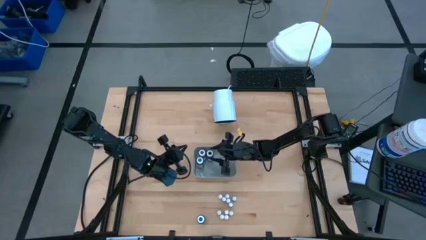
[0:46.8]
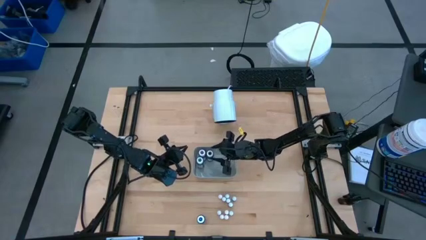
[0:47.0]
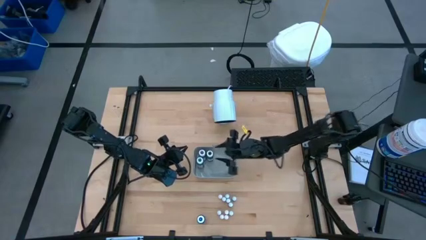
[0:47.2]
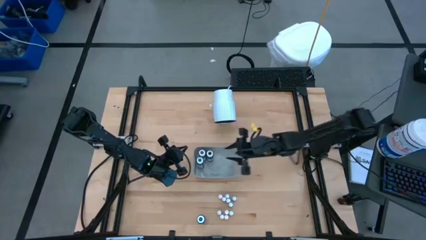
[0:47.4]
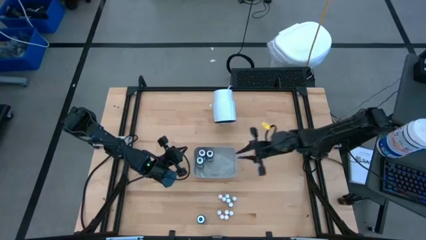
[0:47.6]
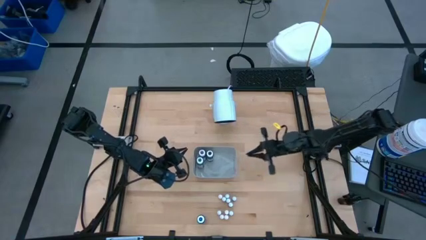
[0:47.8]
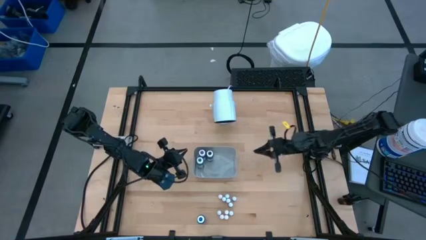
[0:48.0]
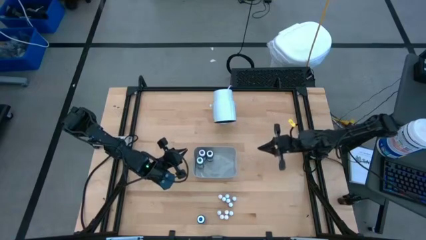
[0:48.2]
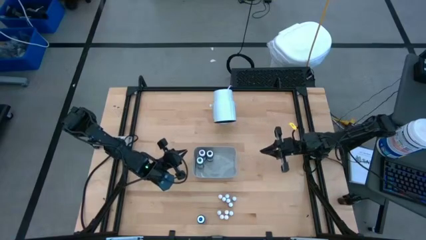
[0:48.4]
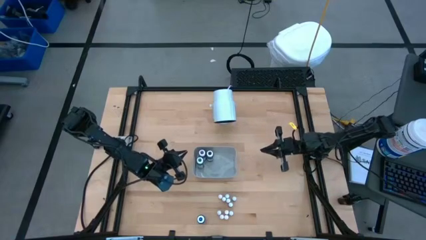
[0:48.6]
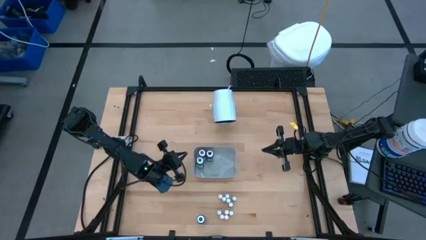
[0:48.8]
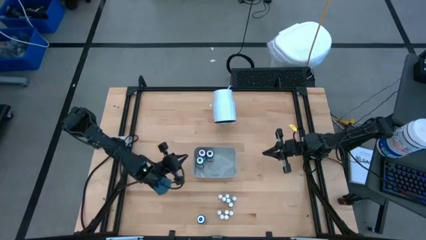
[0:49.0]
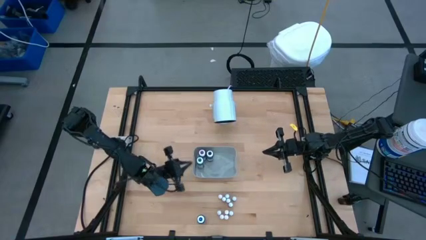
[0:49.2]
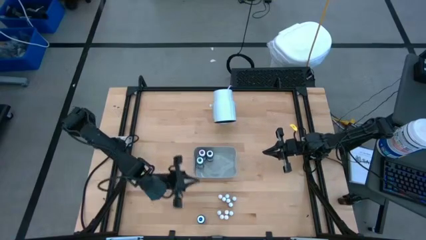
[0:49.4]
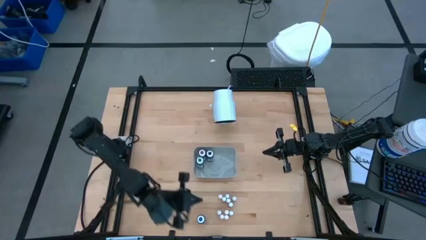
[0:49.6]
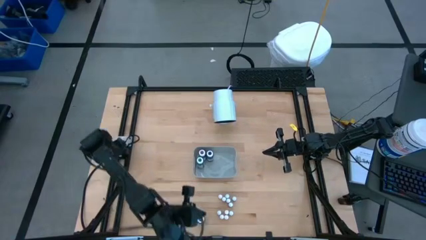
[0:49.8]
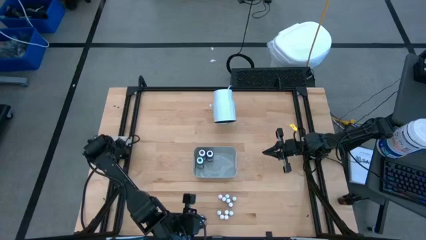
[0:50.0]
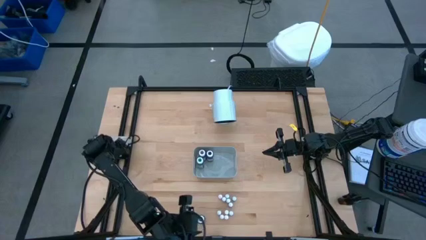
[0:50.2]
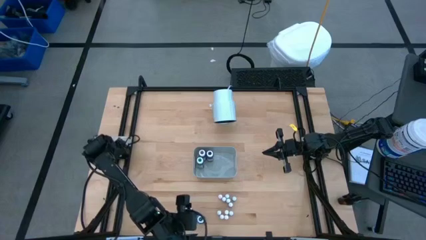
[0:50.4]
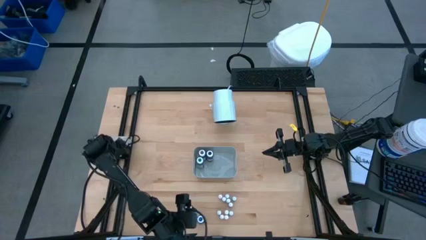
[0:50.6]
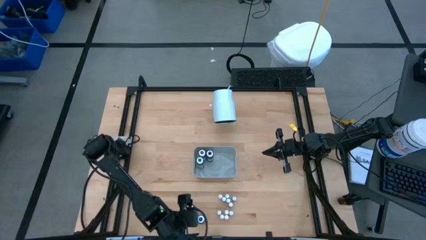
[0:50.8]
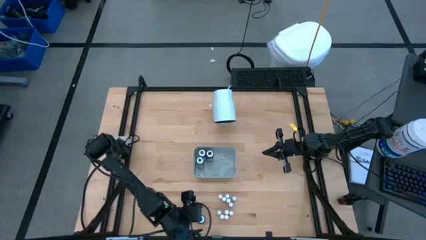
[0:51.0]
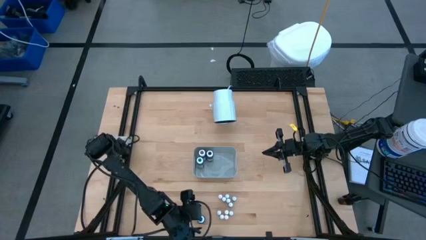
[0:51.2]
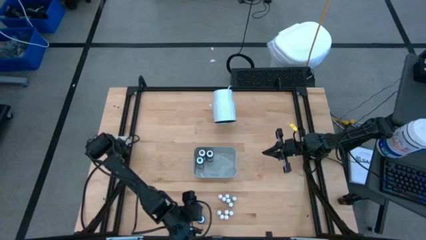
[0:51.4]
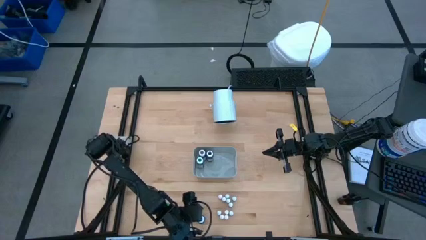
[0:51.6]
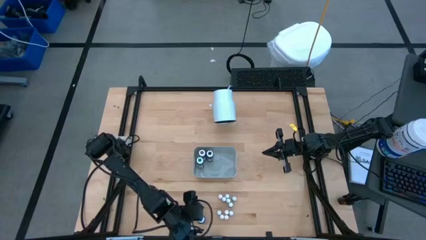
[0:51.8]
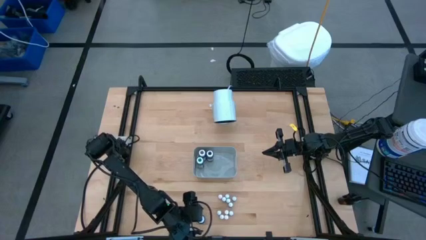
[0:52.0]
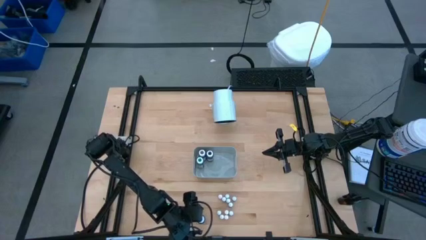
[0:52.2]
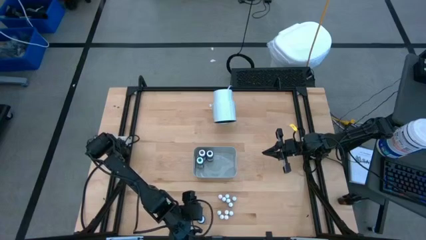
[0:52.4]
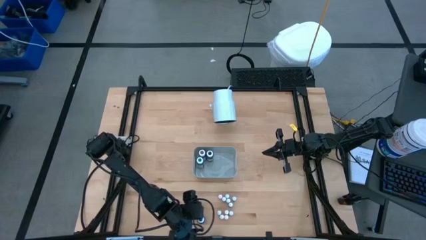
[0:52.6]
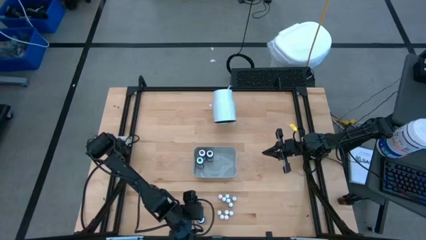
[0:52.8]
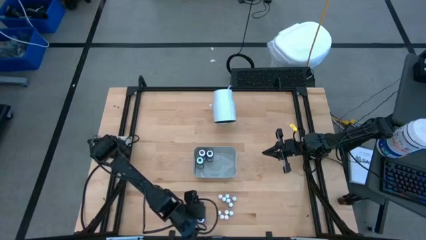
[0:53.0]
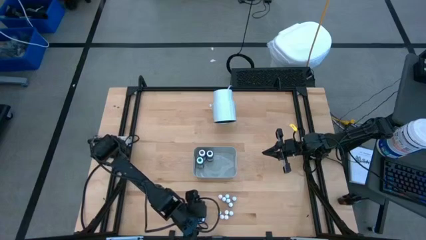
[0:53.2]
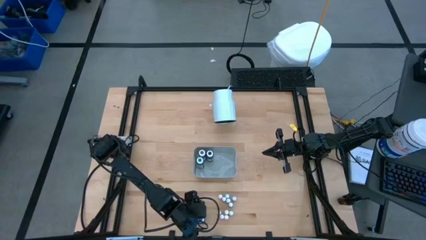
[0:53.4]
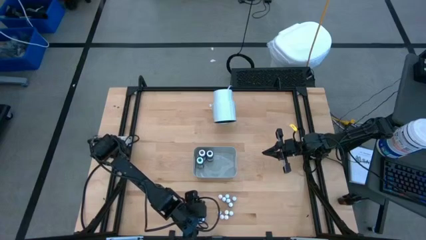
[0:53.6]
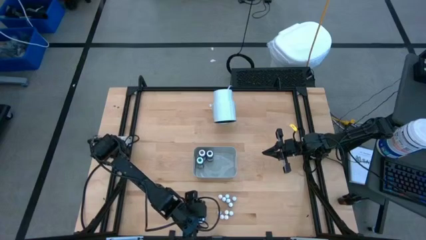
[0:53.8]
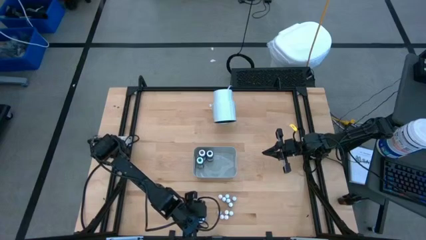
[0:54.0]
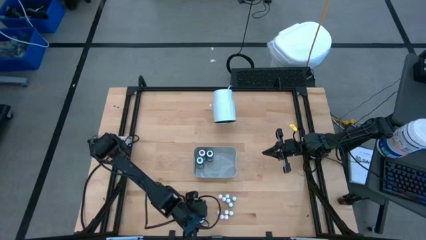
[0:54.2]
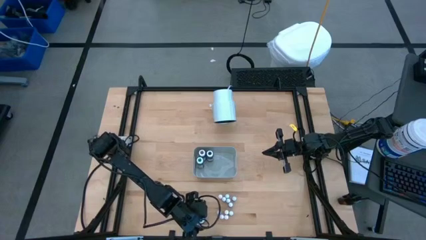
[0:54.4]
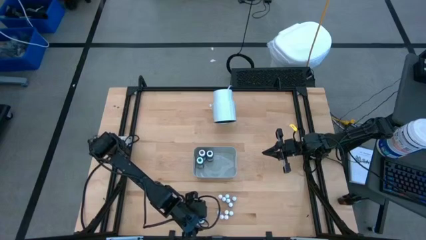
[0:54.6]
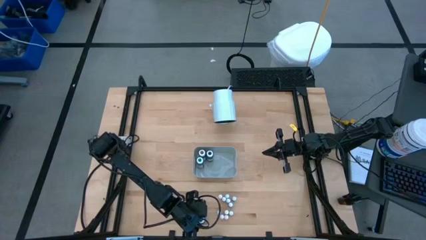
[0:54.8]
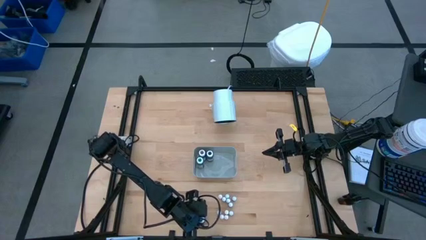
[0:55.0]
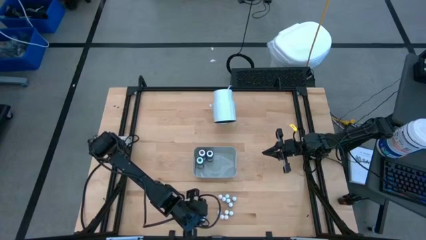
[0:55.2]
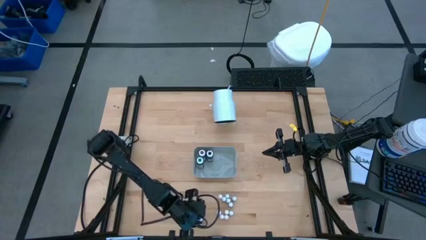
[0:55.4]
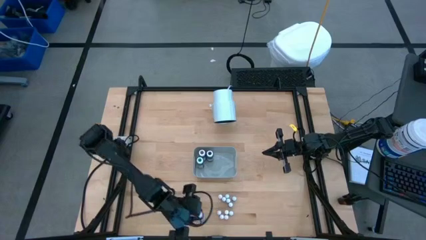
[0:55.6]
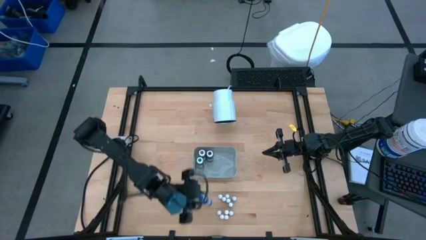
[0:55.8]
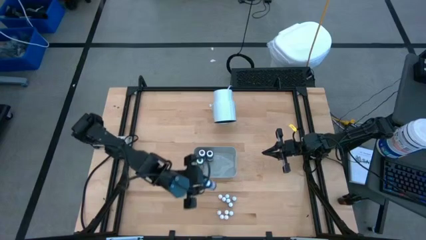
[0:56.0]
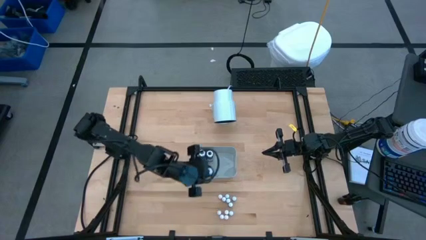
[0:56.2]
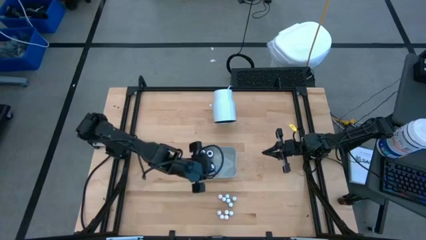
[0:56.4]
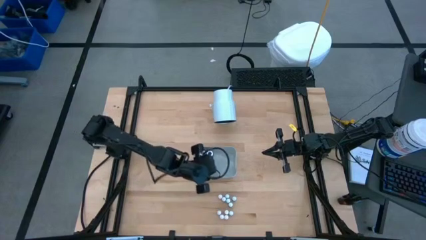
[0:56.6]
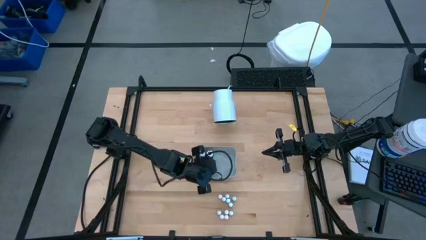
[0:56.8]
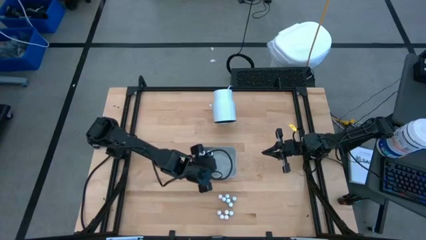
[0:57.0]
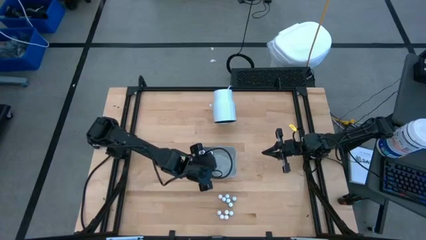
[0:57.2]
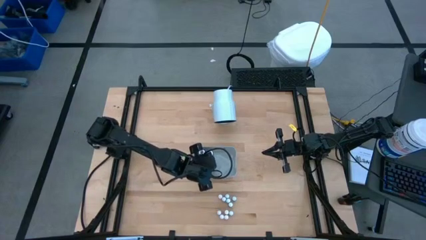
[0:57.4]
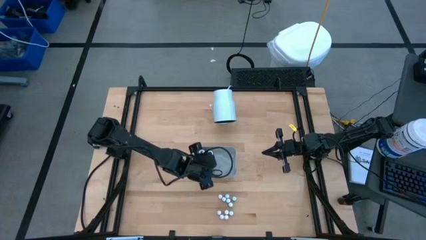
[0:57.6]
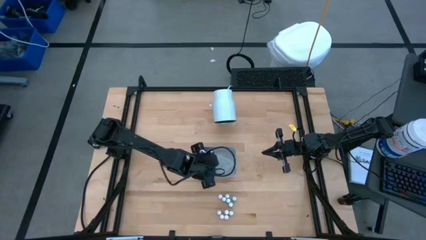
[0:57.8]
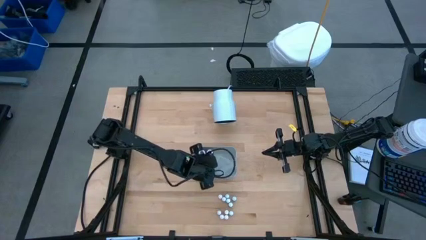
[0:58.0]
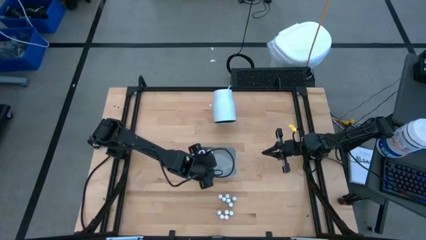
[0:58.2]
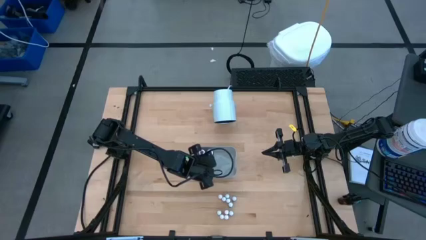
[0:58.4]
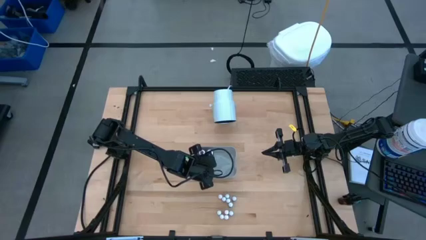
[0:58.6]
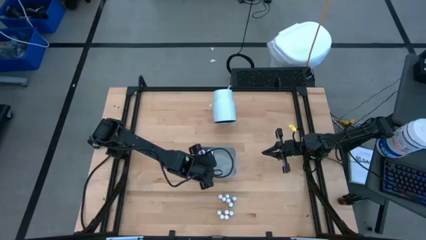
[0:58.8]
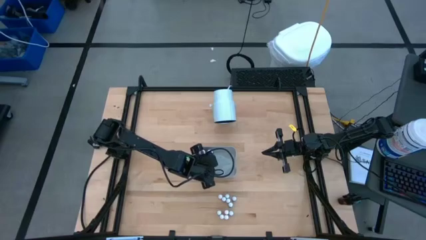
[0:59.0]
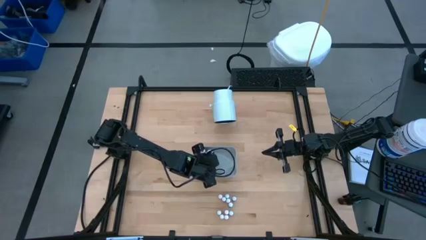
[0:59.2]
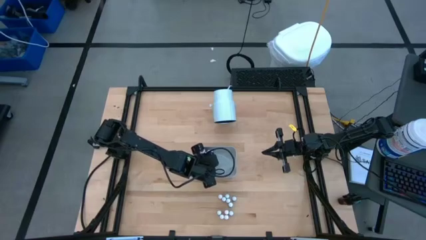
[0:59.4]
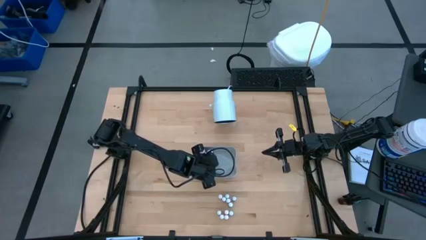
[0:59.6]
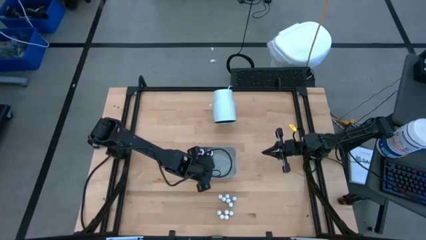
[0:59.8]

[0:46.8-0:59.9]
Task: Pick & Place food coloring
Put the large blue food coloring bottle into the gray bin
